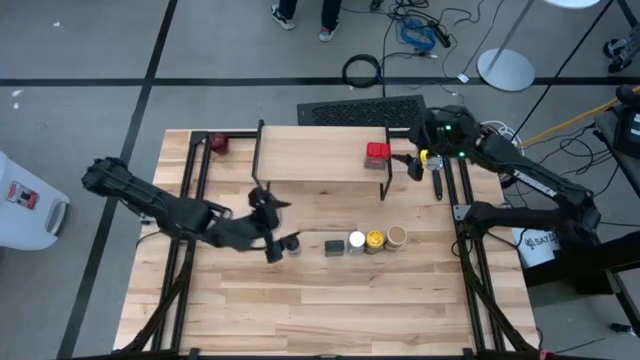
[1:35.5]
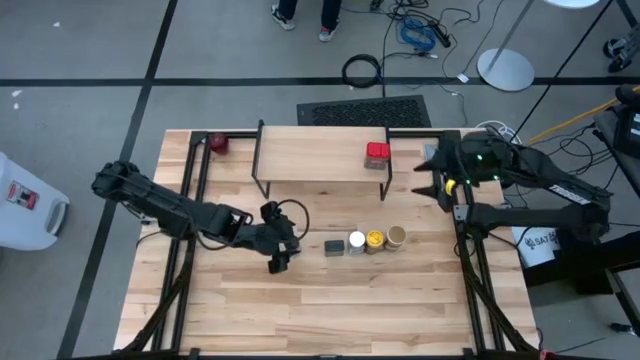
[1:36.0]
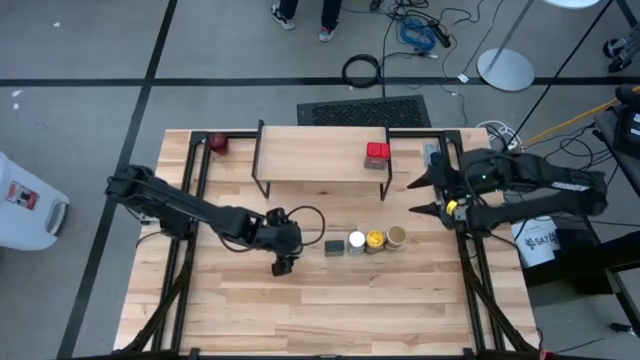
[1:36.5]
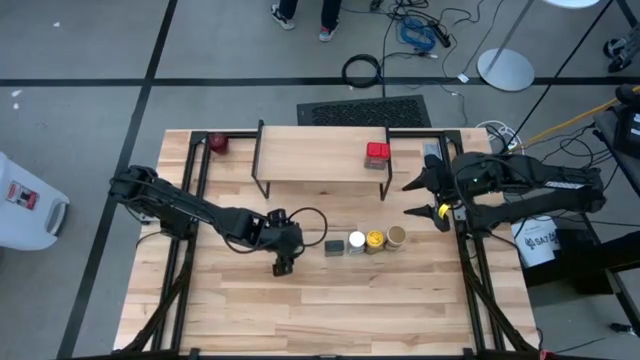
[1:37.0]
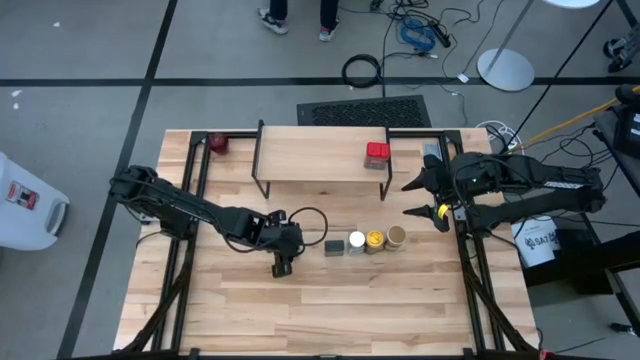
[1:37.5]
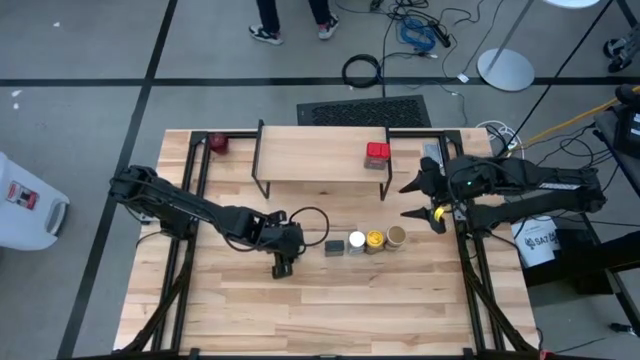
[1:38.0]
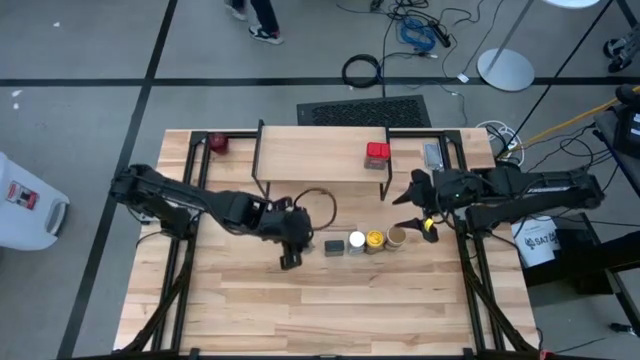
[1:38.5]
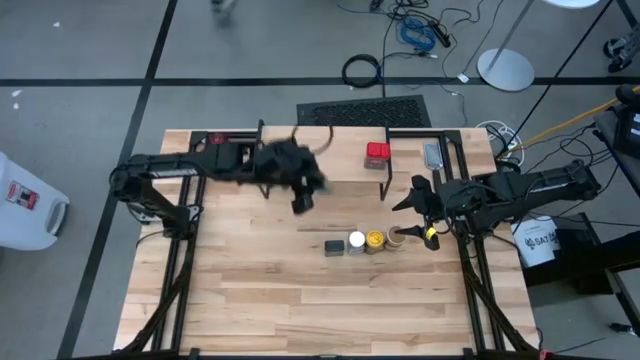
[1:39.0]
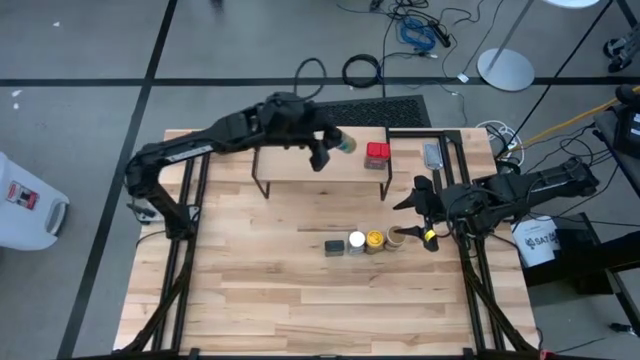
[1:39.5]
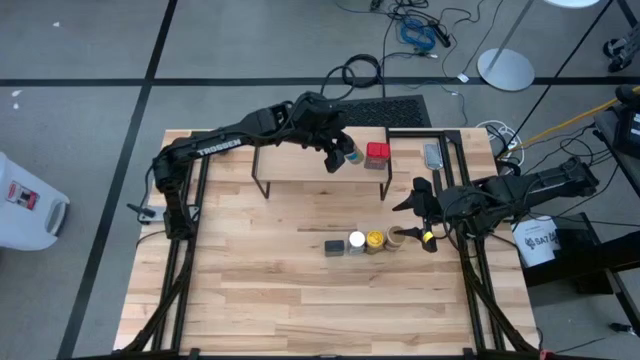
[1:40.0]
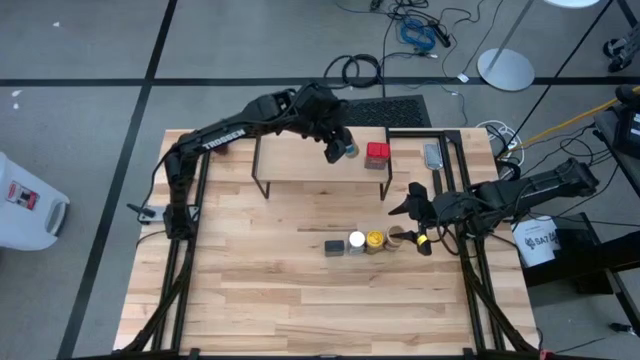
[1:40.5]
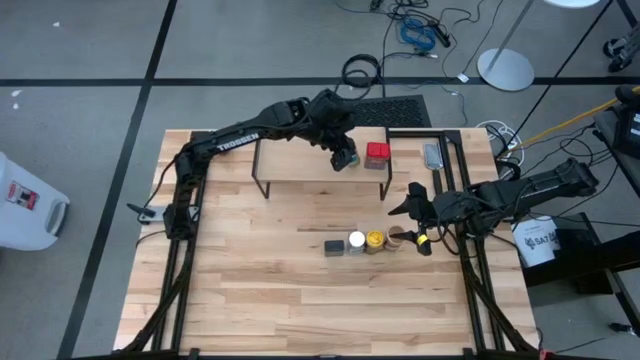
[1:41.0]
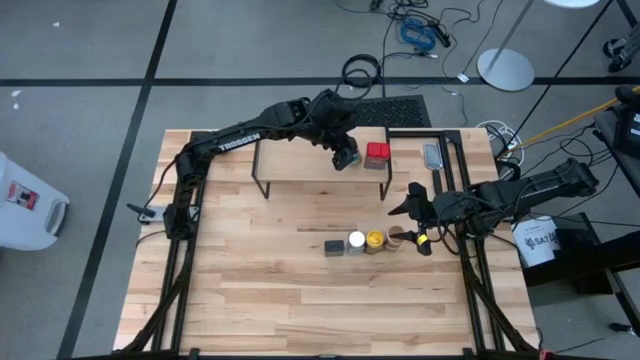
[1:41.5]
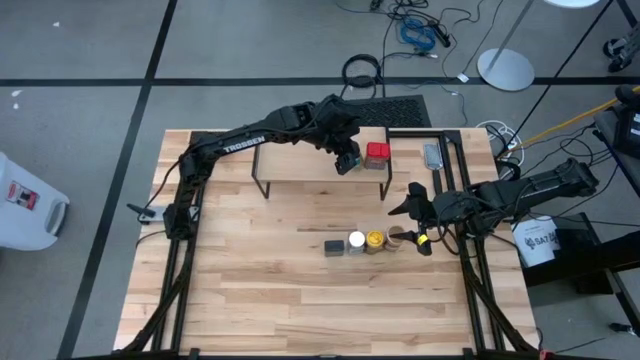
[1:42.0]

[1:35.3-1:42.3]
Task: Shelf spices
Put the black seasoning bottle on the shelf

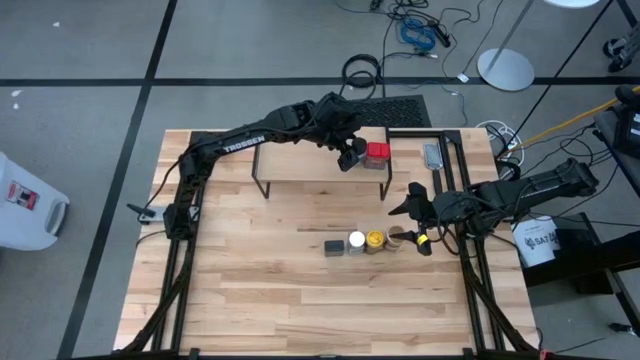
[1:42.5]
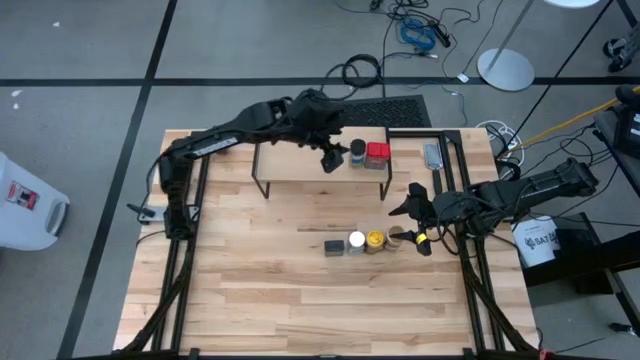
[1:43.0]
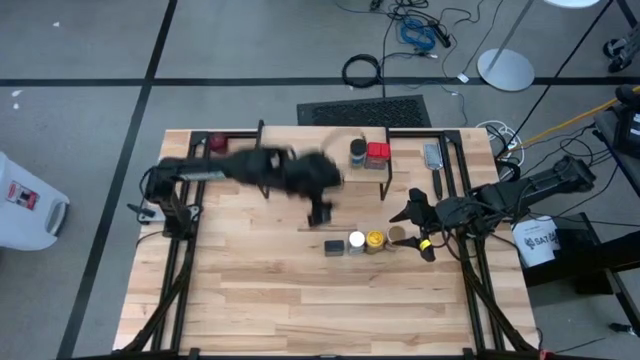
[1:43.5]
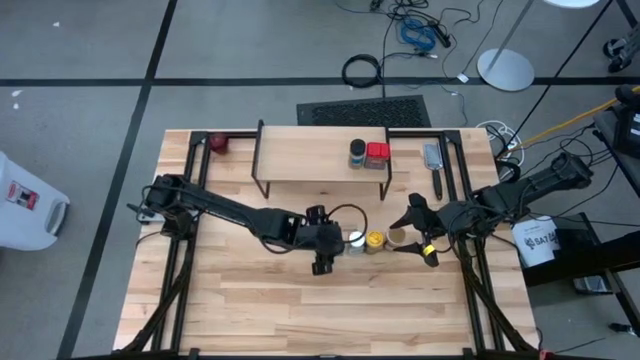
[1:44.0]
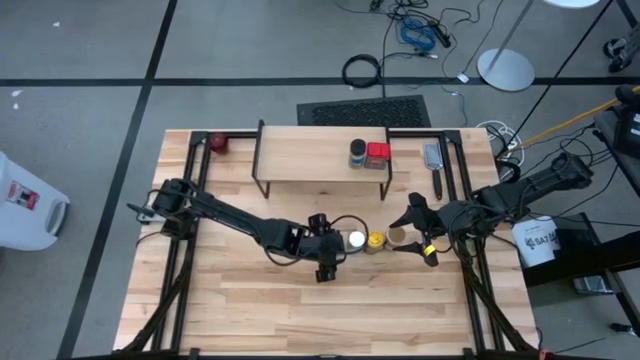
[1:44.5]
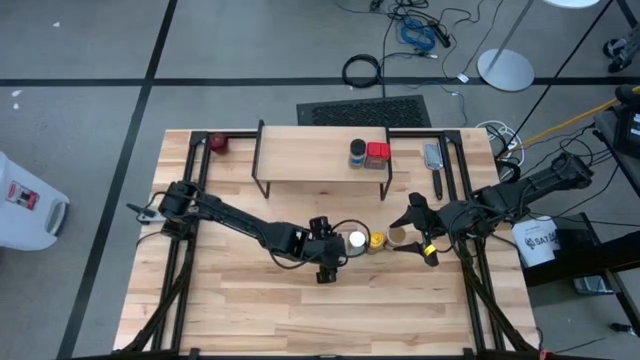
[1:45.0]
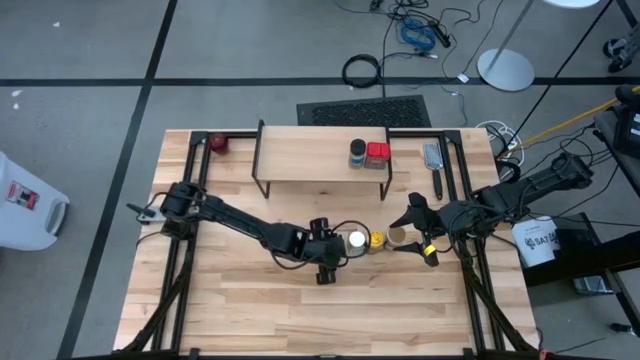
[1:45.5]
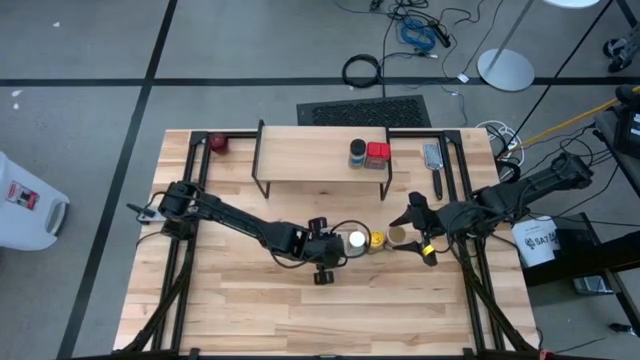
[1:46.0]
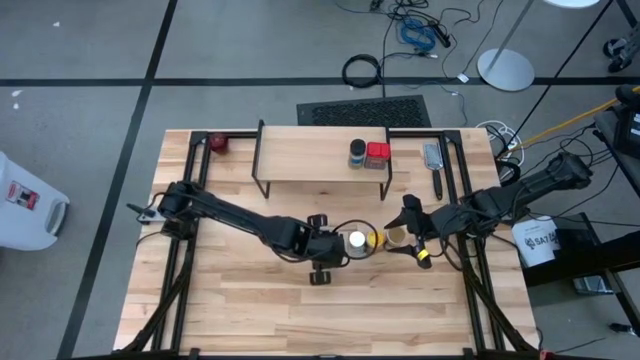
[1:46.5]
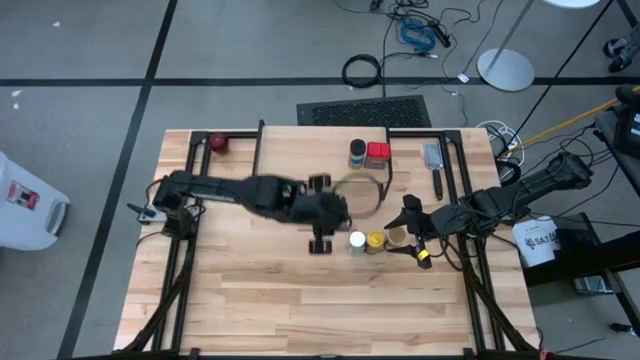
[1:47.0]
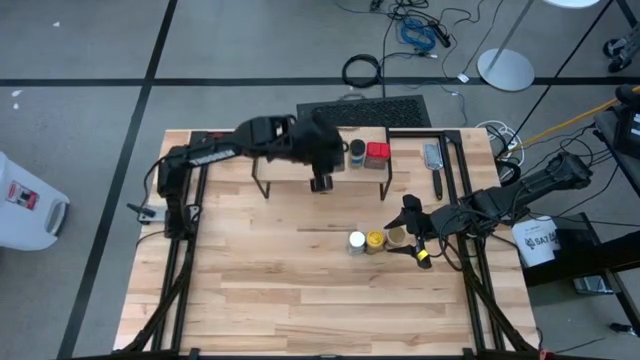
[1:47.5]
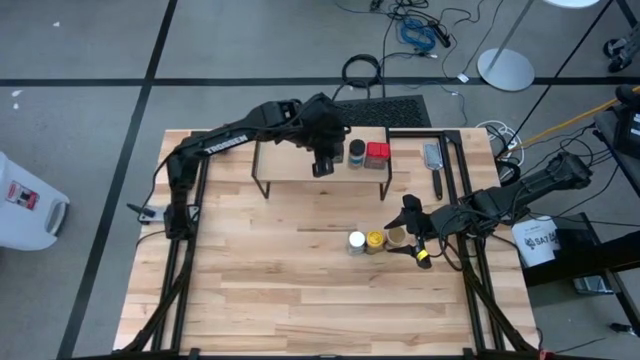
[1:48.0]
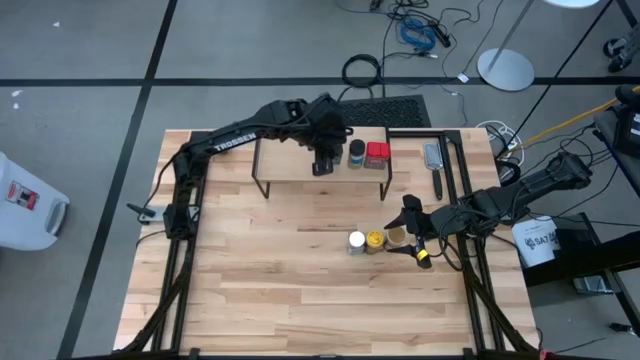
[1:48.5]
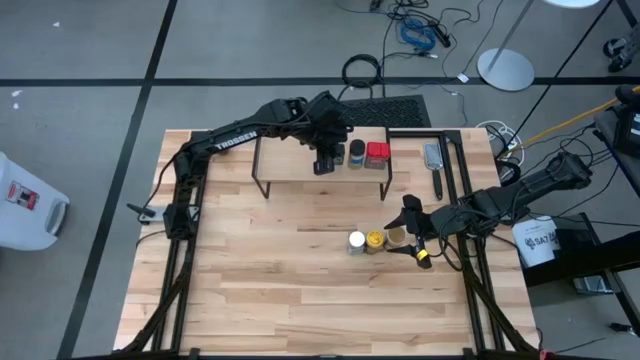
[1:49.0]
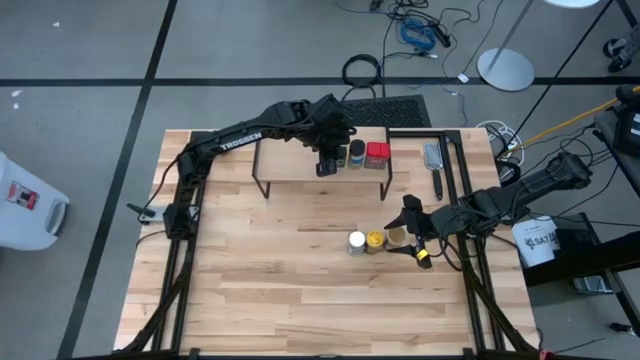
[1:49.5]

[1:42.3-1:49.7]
Put the black seasoning can on the shelf

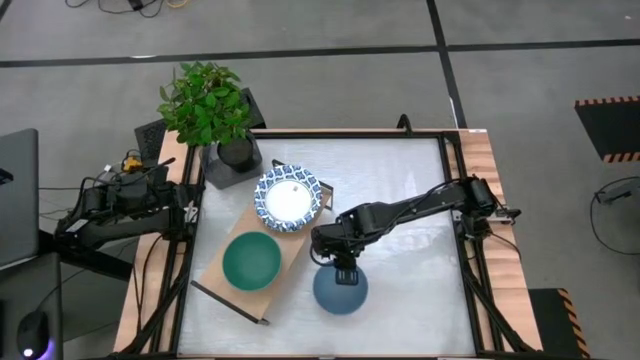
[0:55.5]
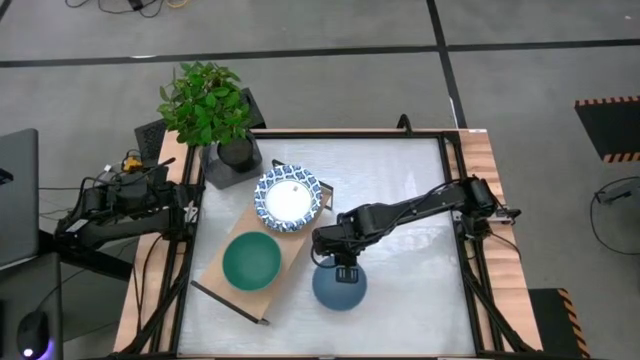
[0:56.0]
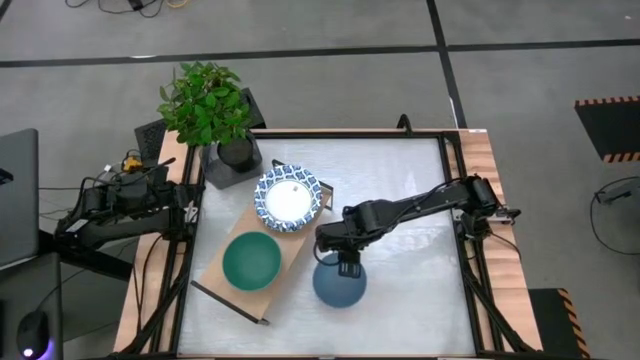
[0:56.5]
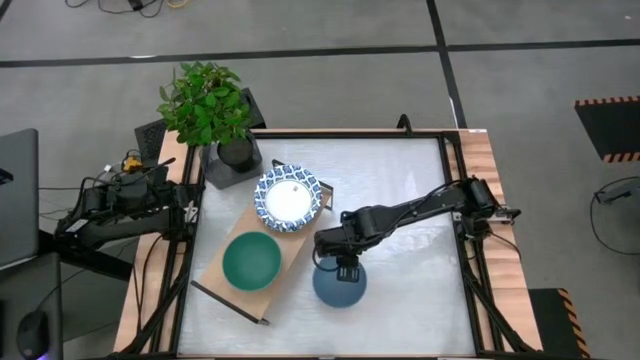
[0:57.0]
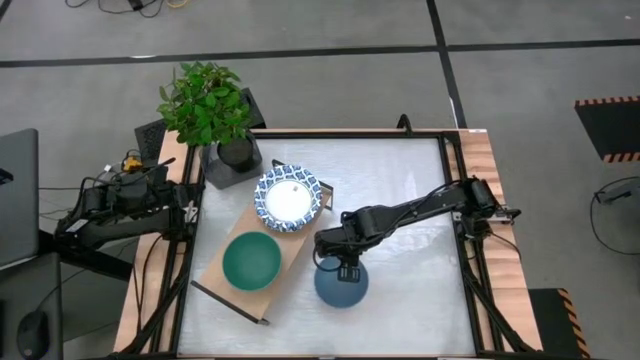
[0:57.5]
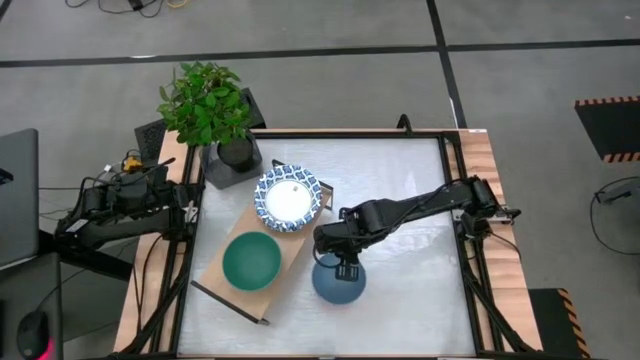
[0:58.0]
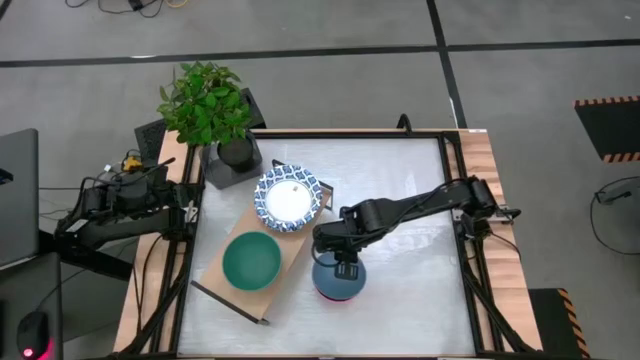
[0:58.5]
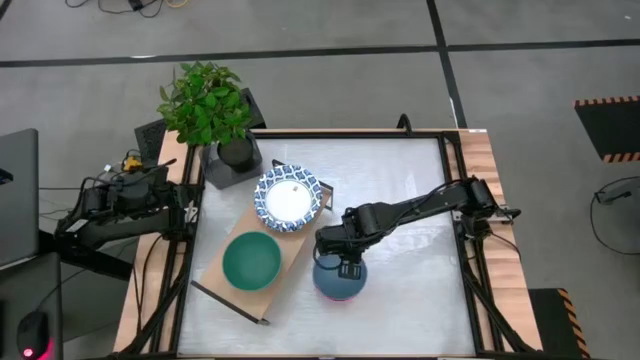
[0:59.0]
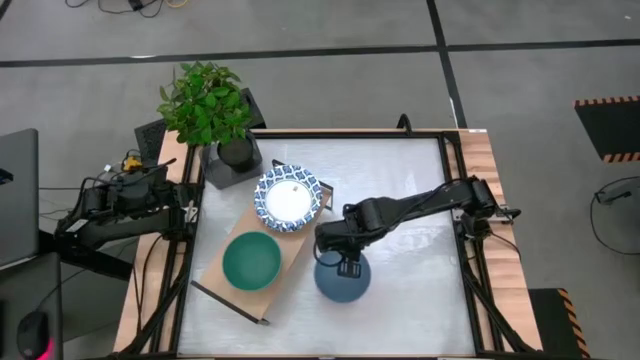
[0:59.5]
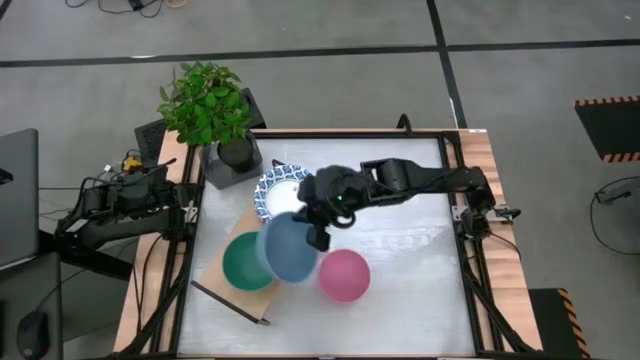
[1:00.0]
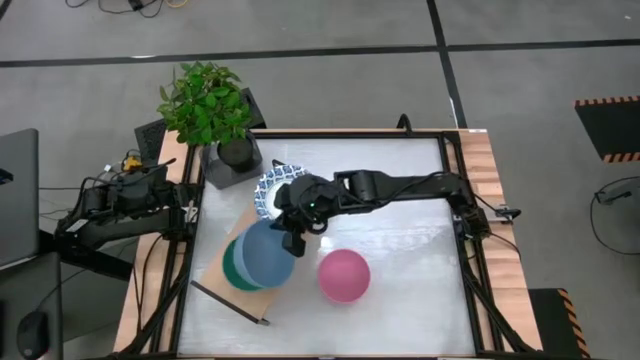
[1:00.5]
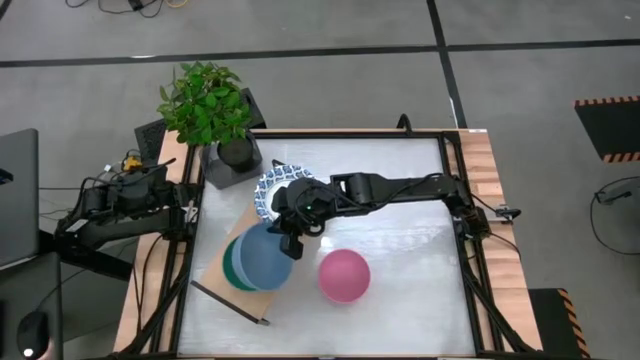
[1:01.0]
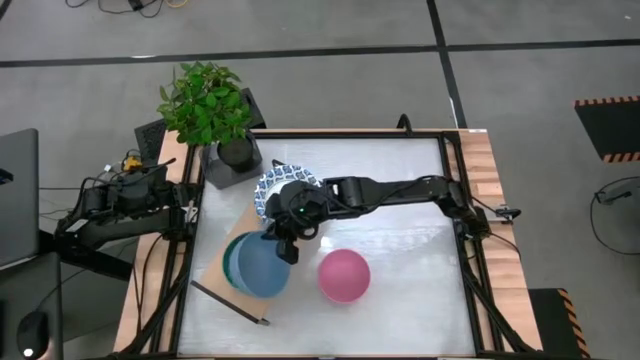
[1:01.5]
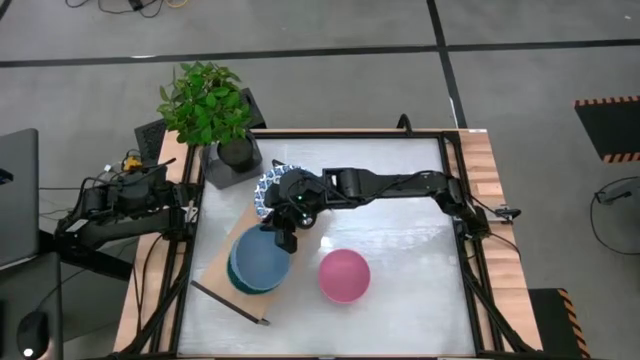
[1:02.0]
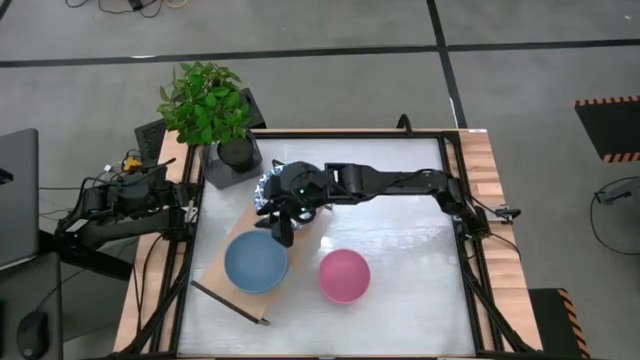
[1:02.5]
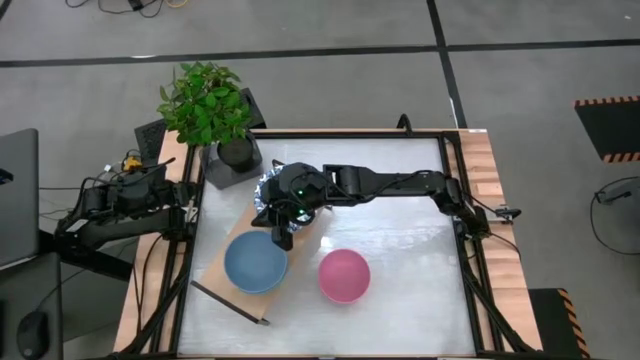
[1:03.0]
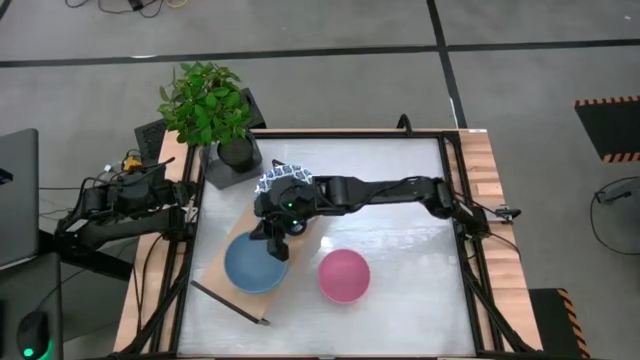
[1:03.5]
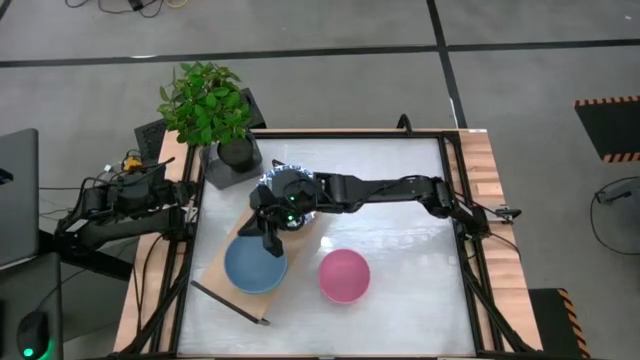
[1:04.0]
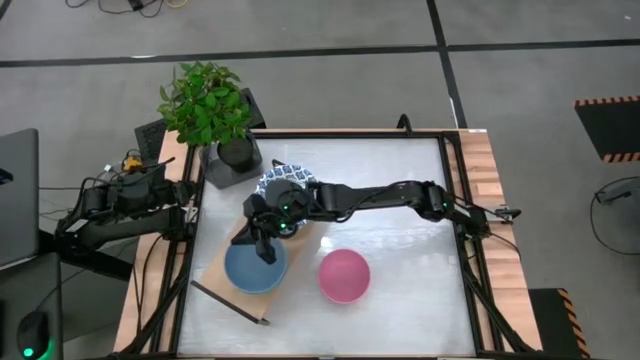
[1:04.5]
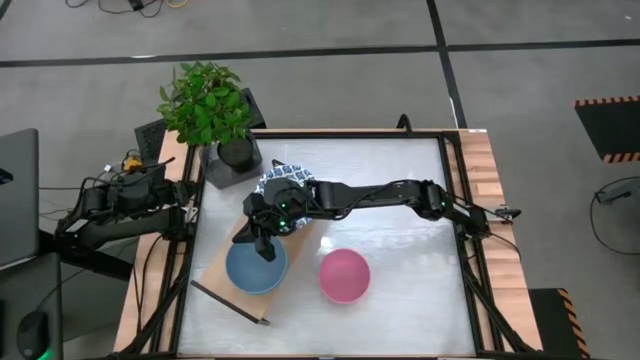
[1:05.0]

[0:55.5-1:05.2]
Task: Place and stack bowls onto a shelf
Stack the blue bowl on the green bowl on the shelf
